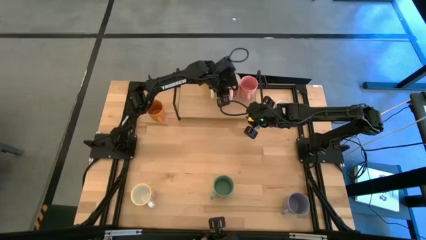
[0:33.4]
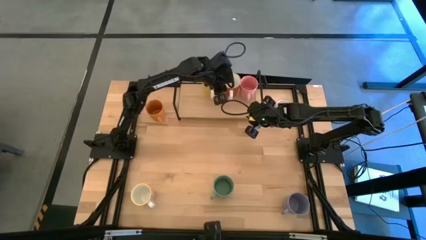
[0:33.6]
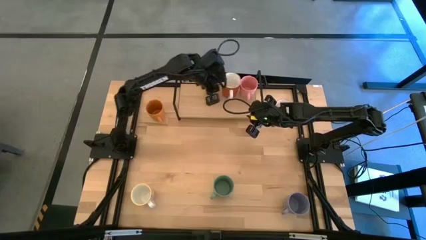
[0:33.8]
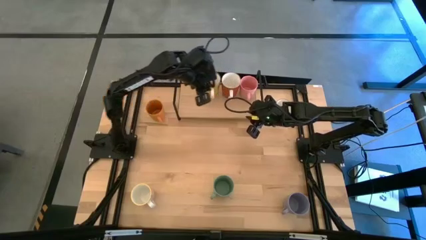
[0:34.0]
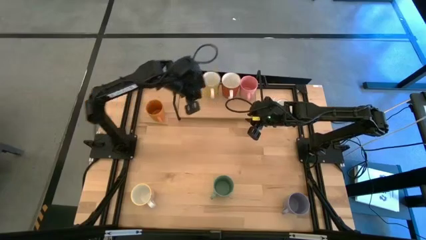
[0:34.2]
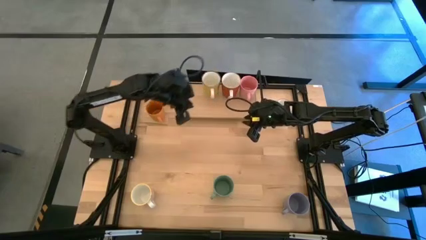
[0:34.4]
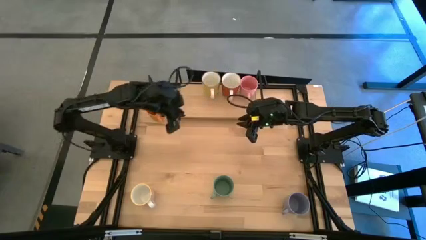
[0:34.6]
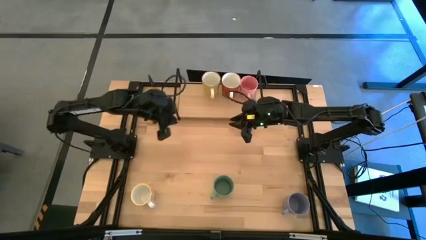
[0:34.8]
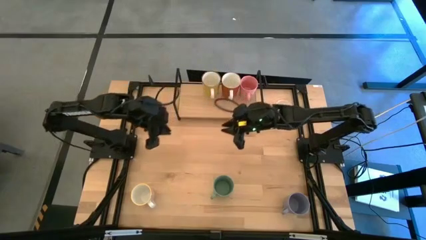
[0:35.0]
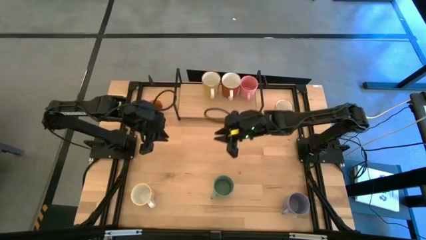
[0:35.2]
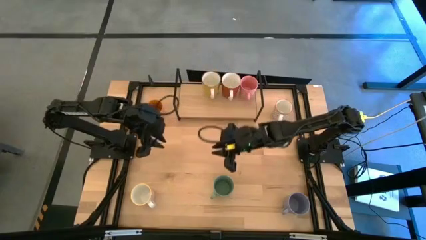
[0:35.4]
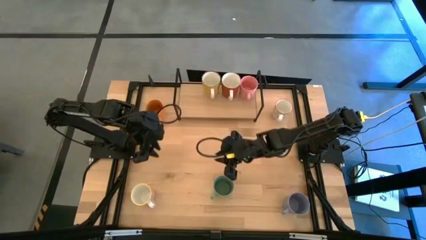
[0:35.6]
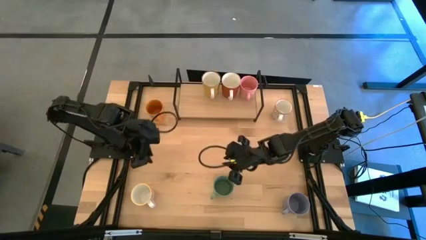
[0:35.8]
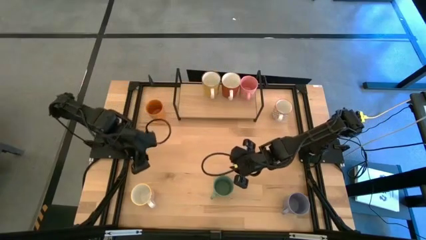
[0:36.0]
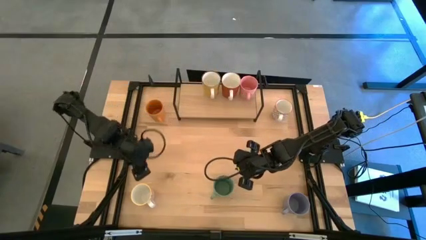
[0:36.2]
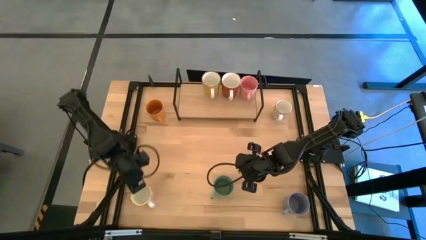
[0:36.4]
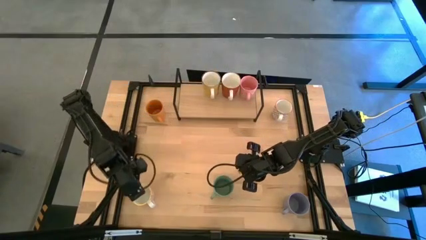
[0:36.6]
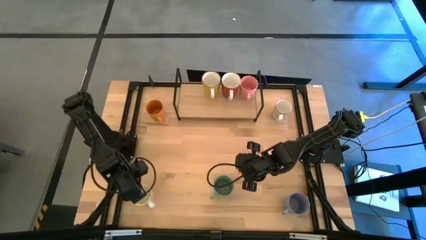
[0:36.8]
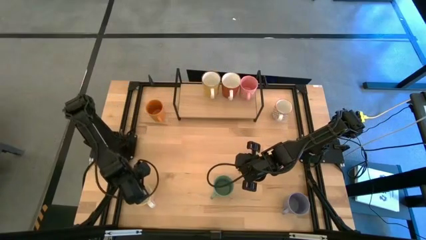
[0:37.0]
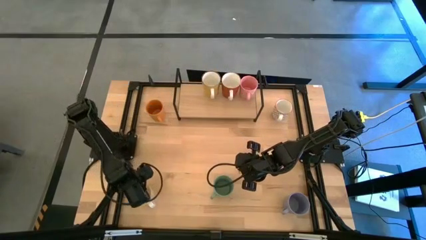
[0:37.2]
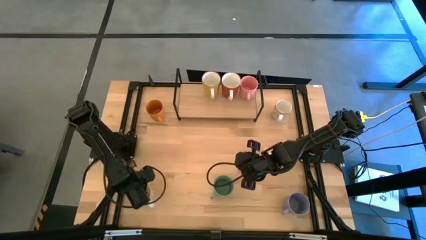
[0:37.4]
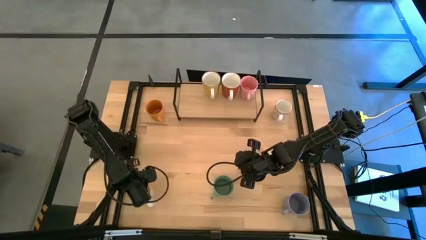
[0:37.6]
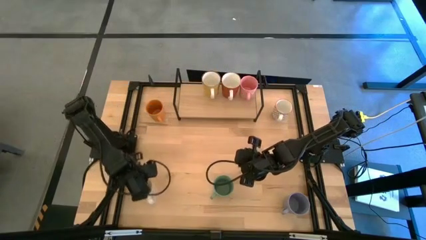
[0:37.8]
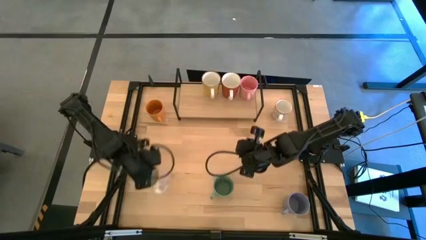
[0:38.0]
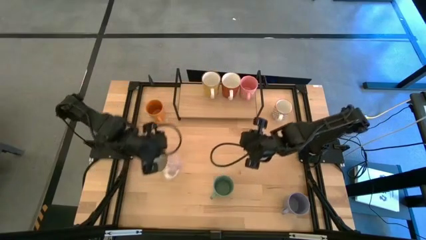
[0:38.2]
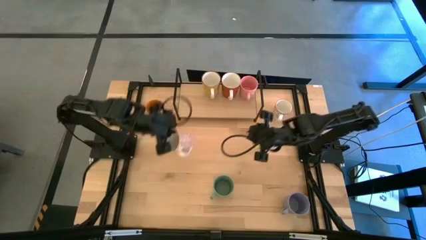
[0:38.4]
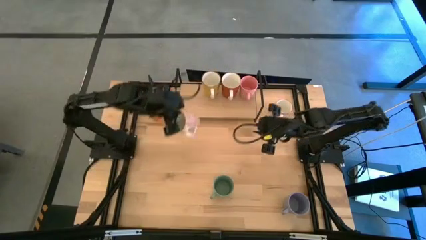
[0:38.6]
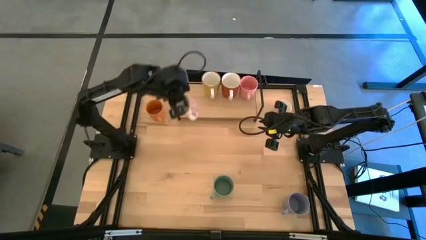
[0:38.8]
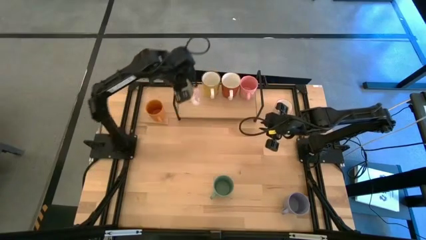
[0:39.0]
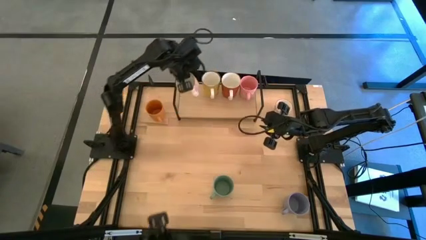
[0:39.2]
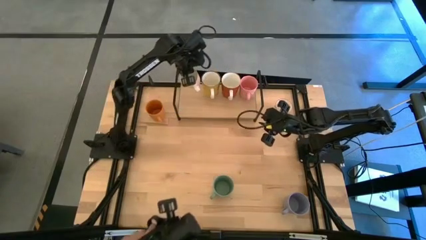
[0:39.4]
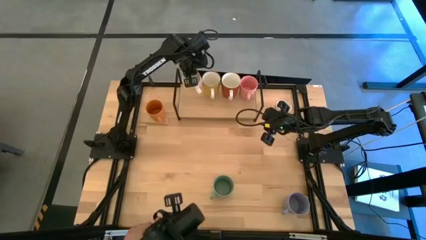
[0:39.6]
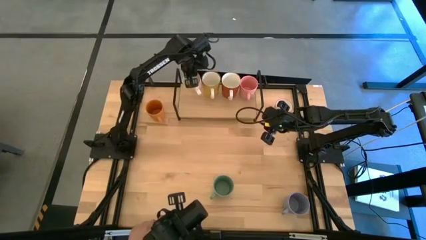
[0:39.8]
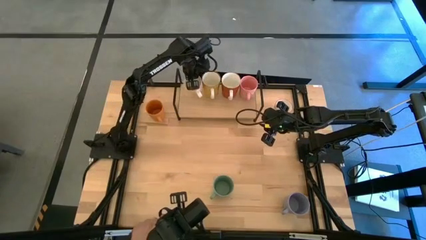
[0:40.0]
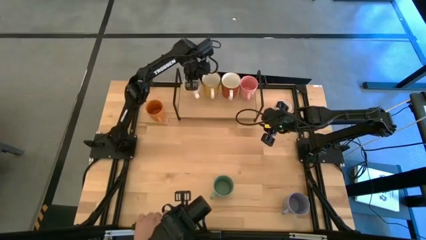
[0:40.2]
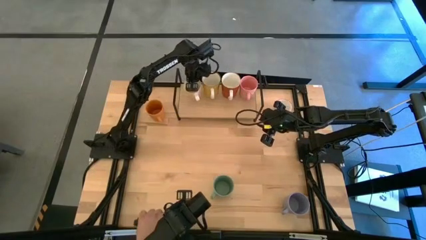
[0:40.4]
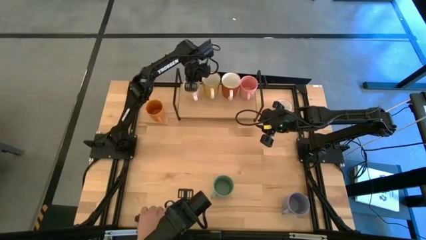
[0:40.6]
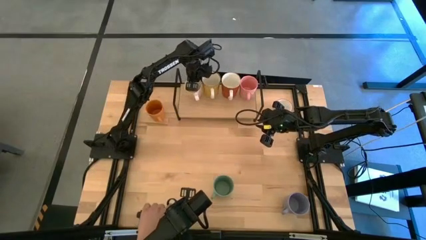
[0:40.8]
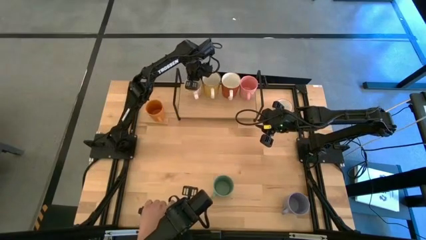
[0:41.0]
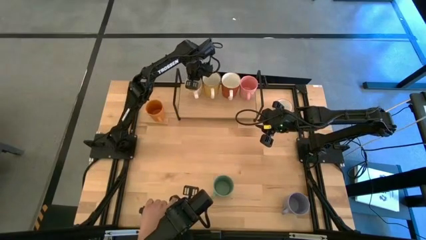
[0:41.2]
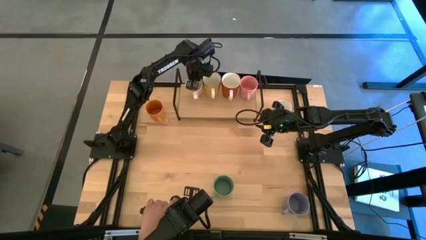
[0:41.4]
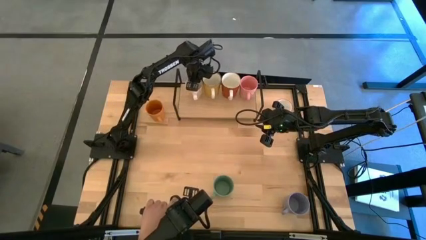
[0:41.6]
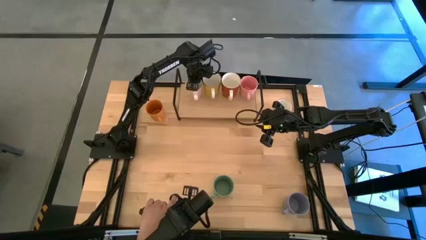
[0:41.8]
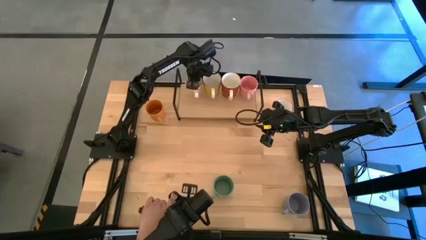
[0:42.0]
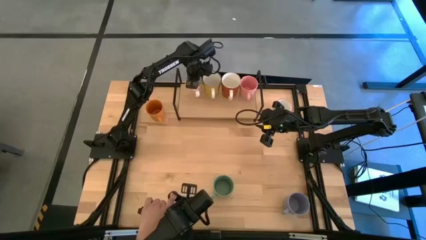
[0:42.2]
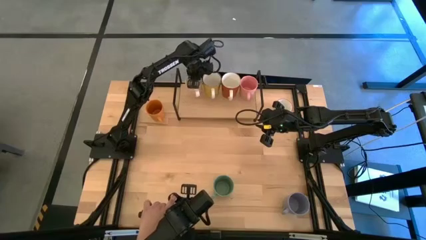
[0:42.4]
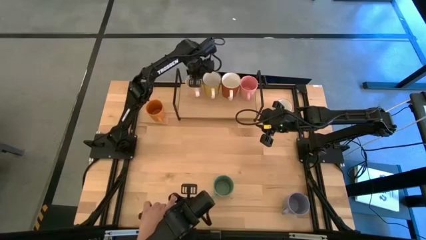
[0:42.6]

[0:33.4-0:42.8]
Task: Place coffee mugs
Put the orange patterned mug on the shelf

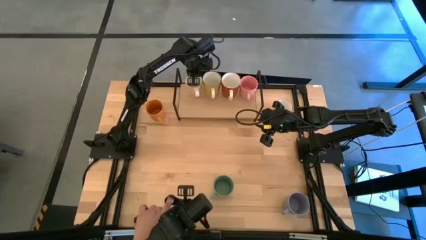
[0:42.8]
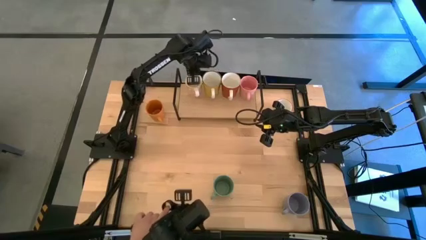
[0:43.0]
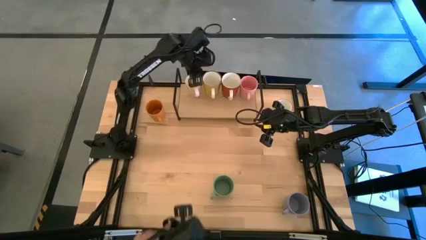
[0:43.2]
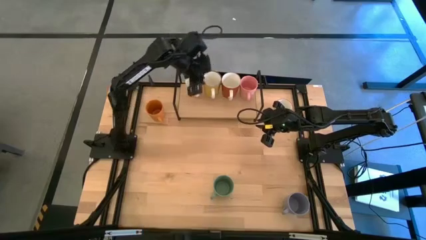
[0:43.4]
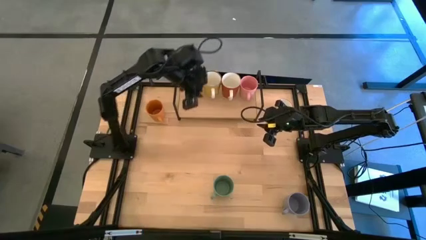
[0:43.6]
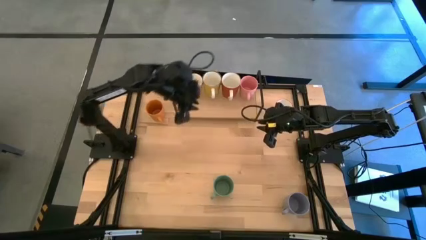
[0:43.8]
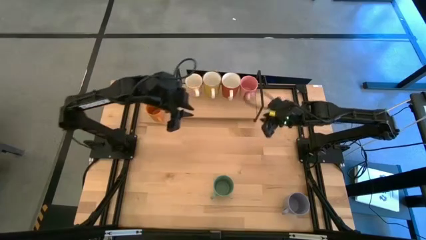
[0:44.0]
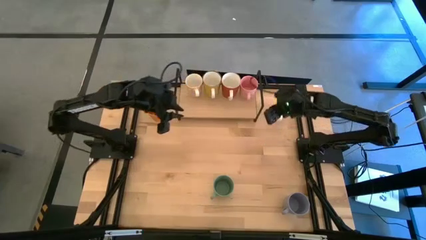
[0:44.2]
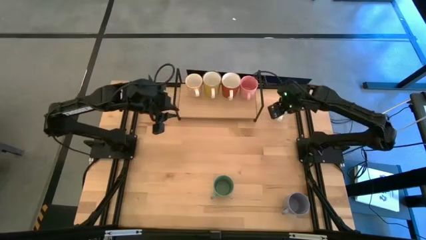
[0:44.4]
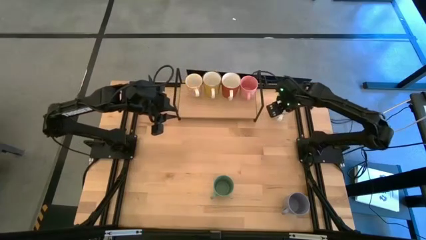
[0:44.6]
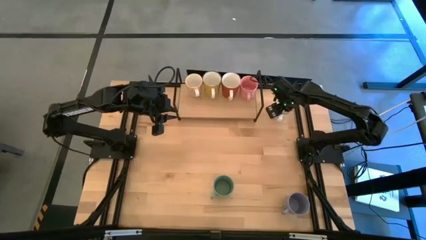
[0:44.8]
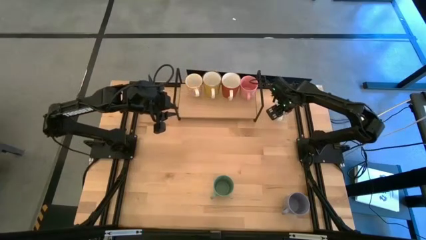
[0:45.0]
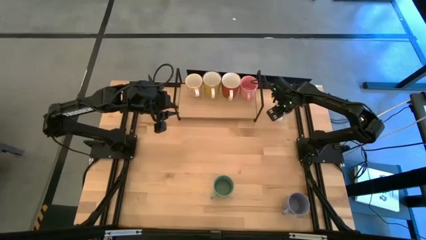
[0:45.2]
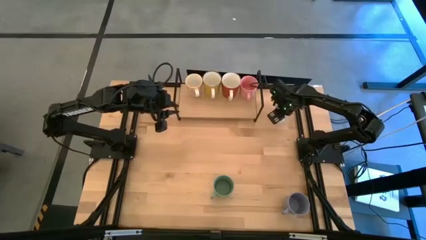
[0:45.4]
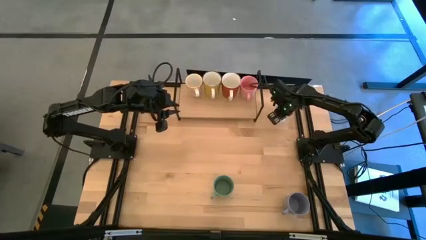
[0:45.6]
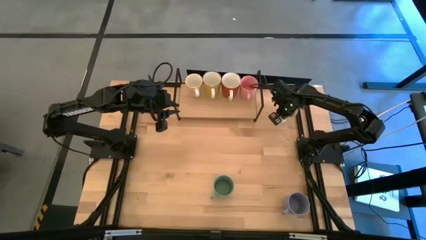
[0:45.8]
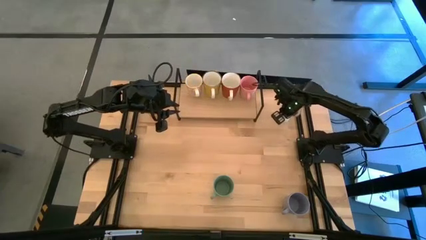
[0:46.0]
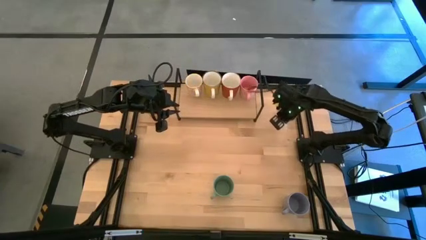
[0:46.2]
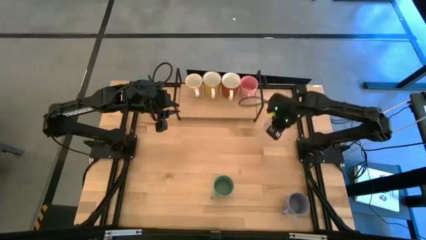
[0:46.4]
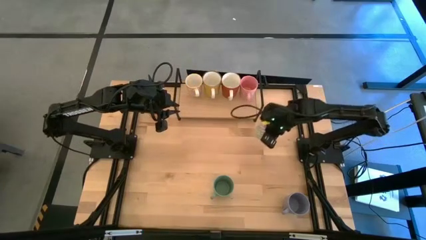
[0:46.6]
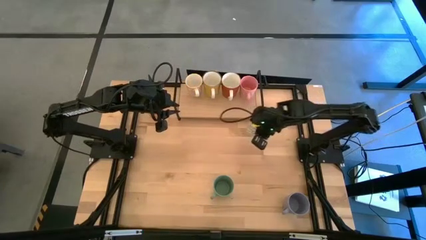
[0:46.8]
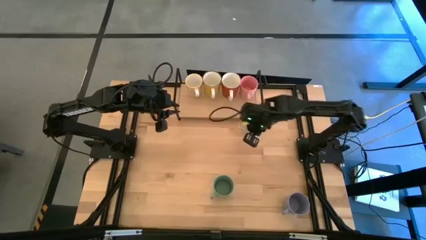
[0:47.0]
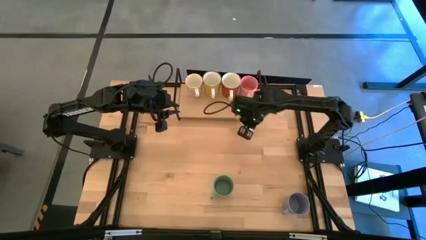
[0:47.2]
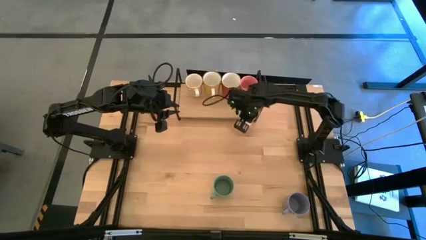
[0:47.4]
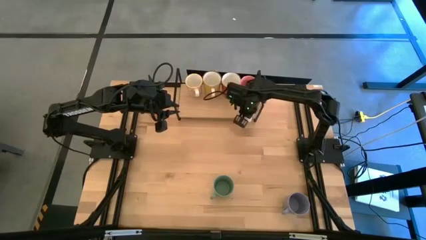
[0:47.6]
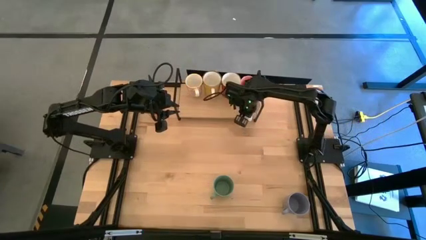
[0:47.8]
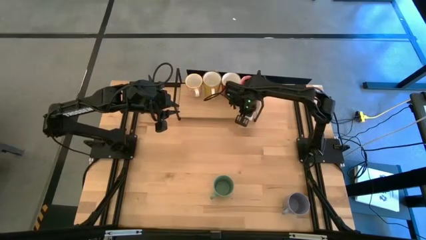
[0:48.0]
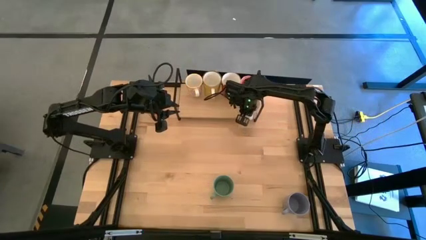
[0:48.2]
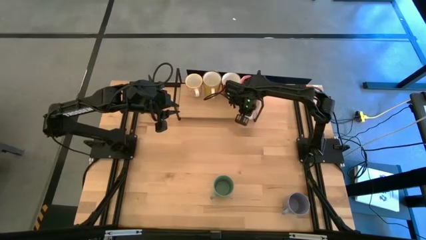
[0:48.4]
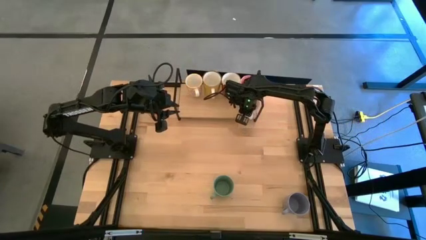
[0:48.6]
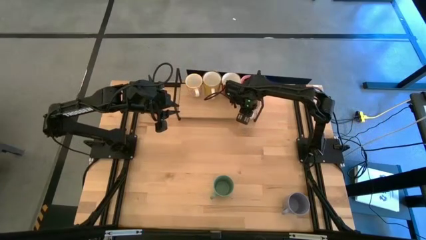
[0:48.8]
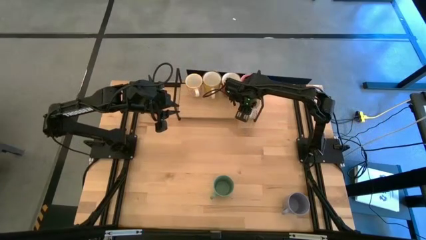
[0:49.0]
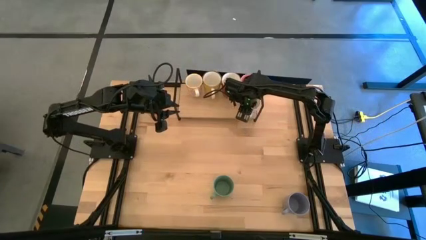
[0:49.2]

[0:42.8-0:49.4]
Put the gray patterned mug on the shelf

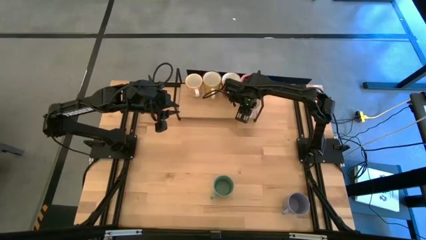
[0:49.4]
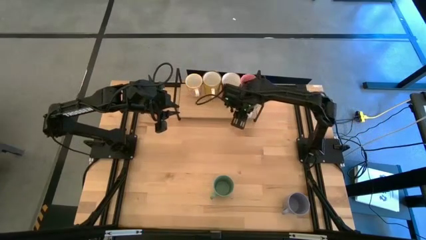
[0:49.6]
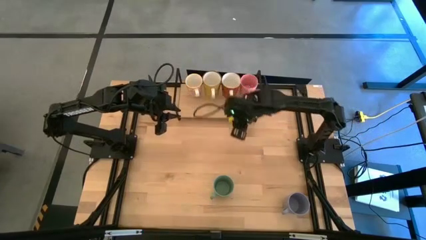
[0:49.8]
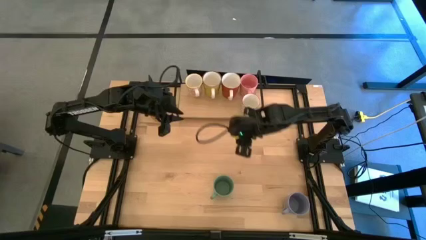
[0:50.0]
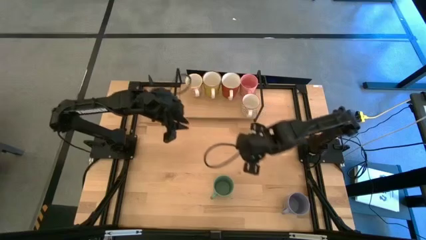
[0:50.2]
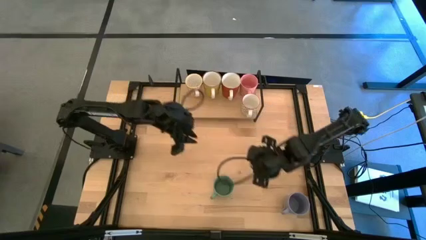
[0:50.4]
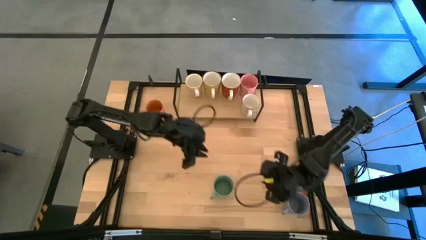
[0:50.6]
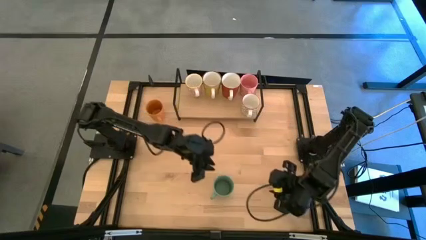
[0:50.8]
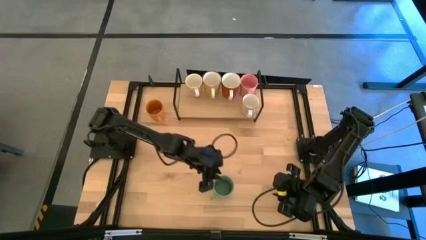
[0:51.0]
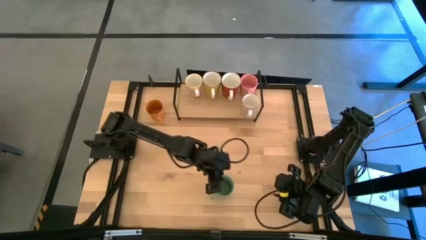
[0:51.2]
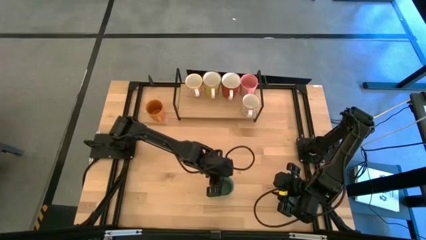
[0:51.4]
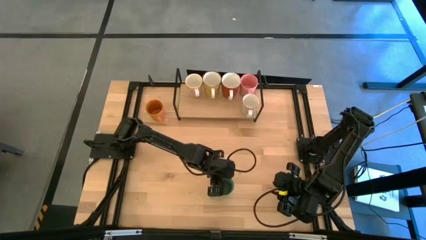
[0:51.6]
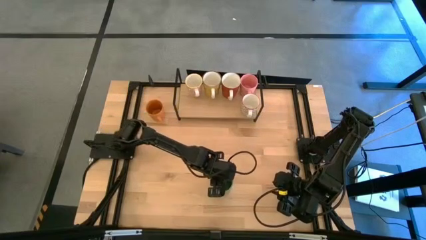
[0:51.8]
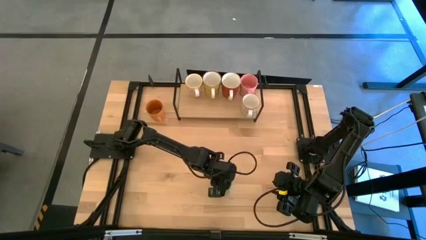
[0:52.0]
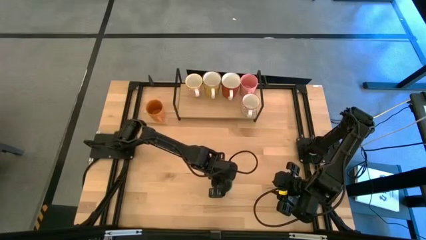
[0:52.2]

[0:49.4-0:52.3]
Put the green mug on the shelf
